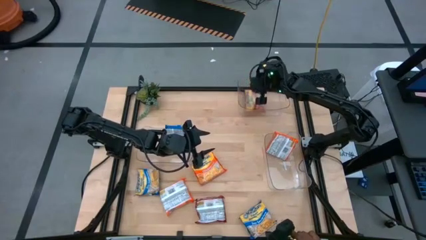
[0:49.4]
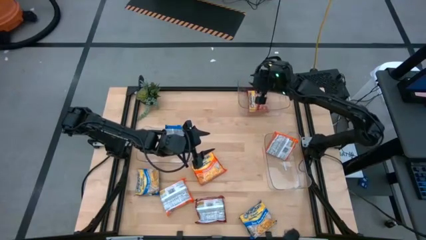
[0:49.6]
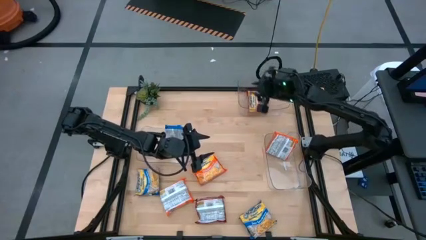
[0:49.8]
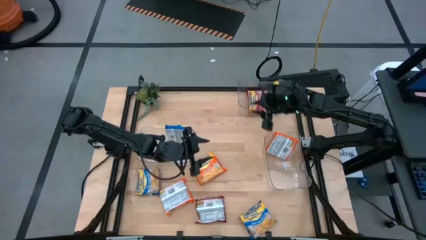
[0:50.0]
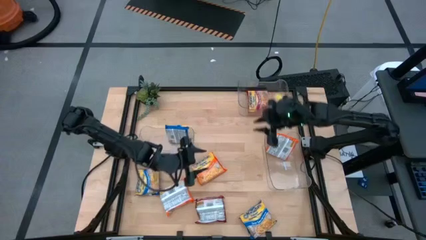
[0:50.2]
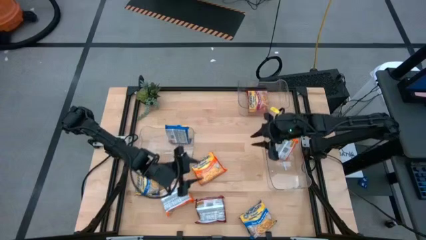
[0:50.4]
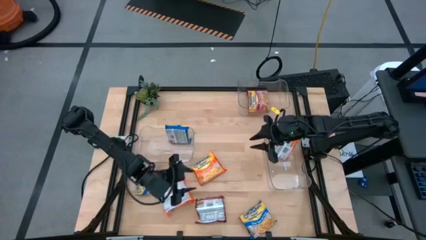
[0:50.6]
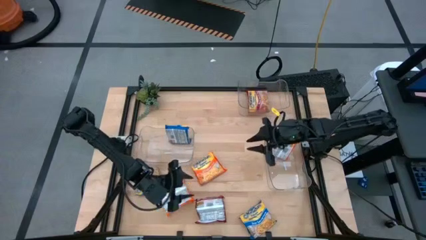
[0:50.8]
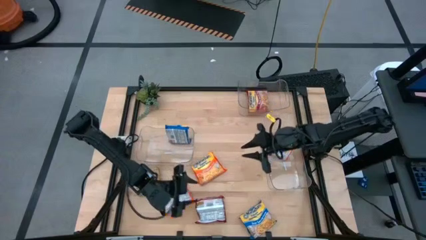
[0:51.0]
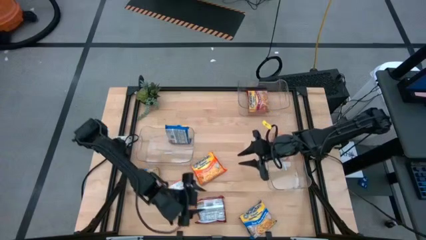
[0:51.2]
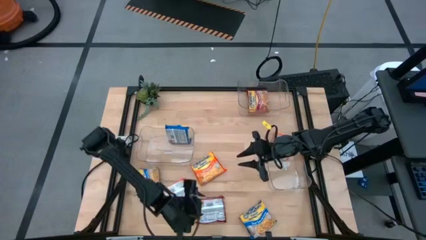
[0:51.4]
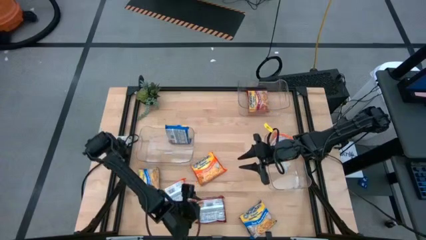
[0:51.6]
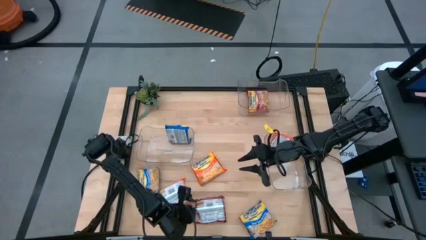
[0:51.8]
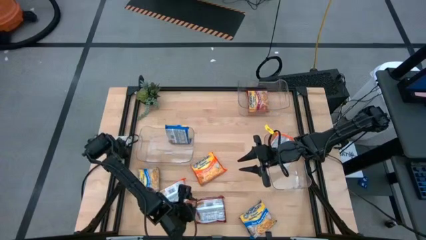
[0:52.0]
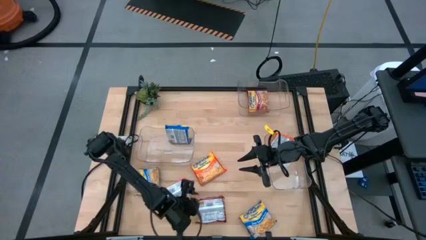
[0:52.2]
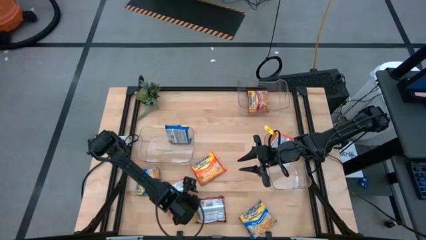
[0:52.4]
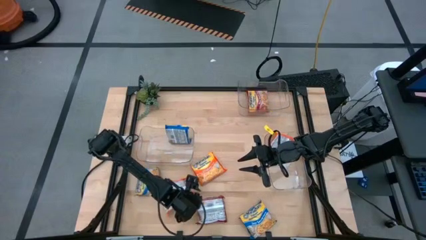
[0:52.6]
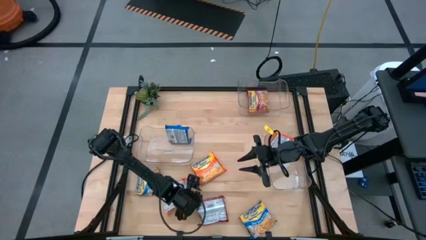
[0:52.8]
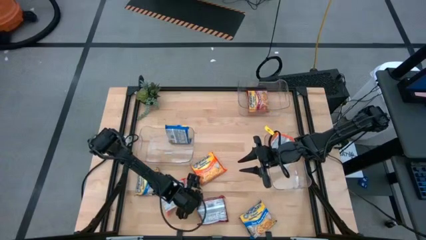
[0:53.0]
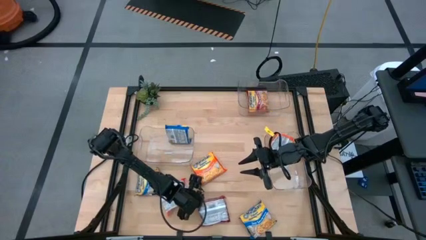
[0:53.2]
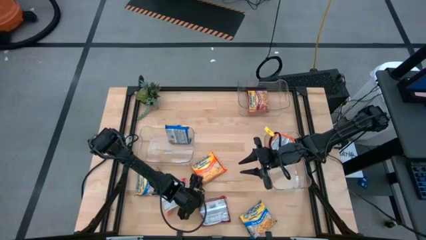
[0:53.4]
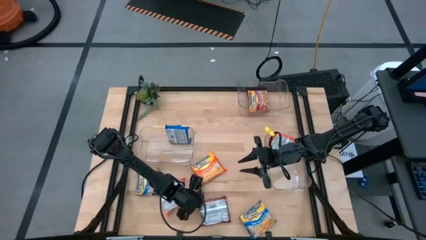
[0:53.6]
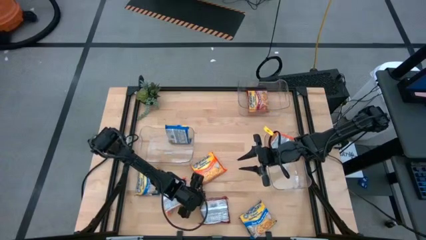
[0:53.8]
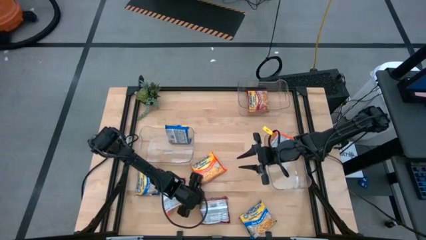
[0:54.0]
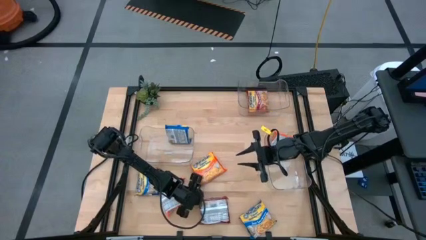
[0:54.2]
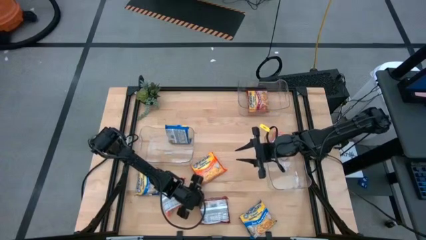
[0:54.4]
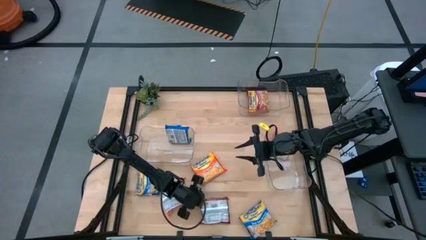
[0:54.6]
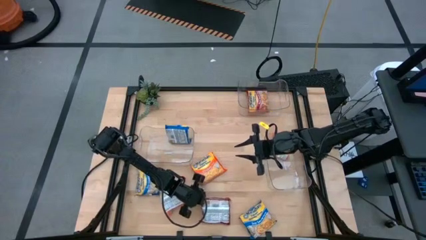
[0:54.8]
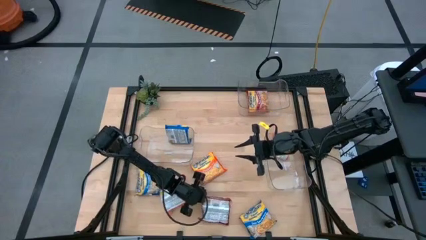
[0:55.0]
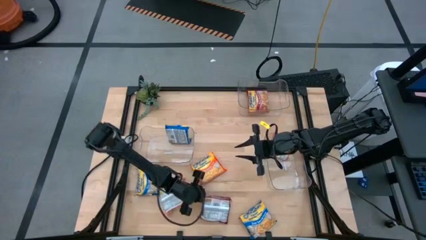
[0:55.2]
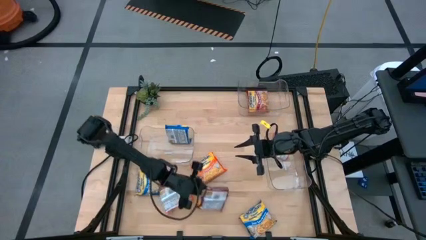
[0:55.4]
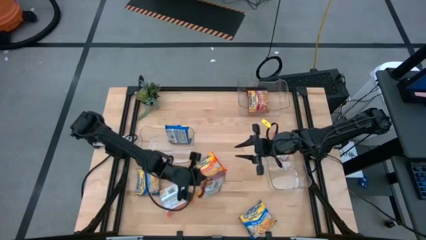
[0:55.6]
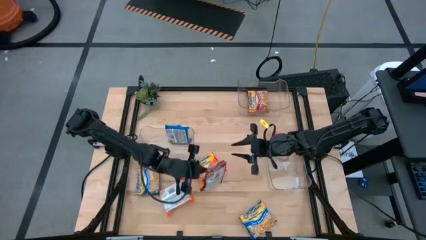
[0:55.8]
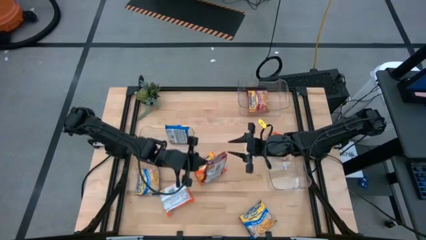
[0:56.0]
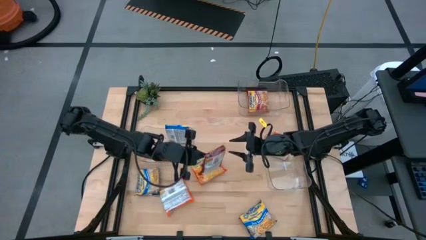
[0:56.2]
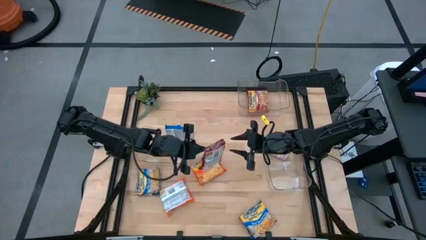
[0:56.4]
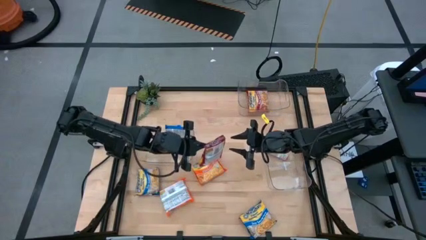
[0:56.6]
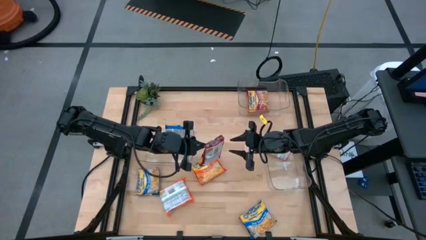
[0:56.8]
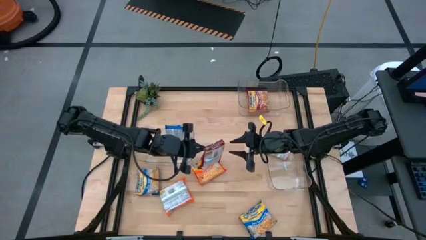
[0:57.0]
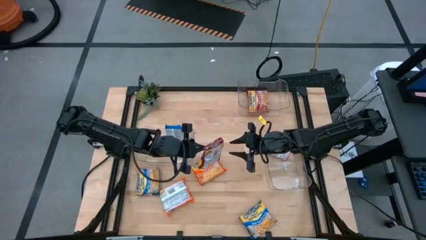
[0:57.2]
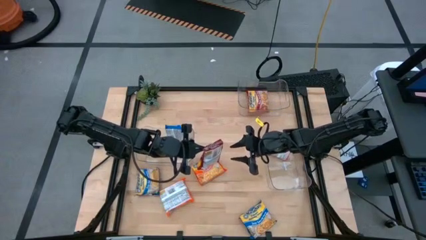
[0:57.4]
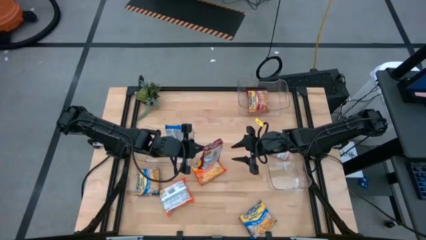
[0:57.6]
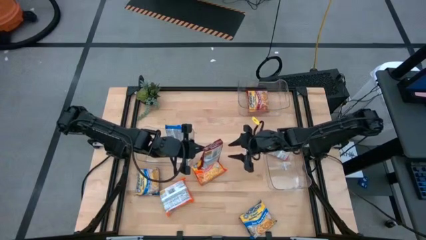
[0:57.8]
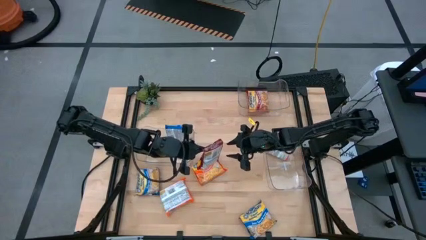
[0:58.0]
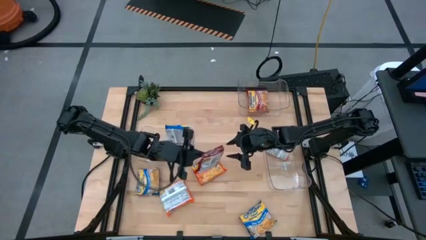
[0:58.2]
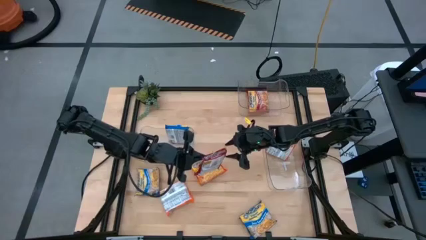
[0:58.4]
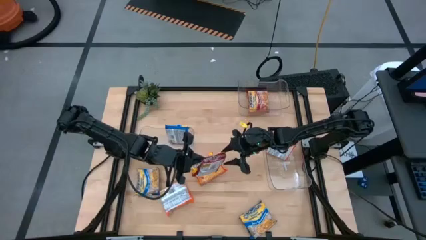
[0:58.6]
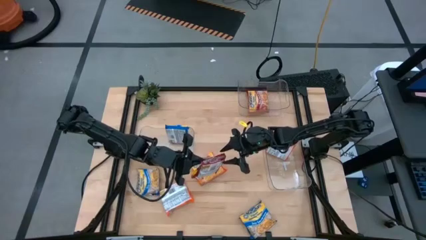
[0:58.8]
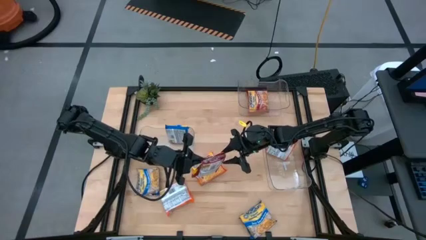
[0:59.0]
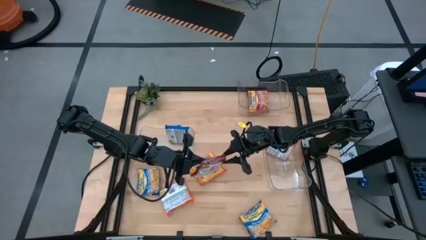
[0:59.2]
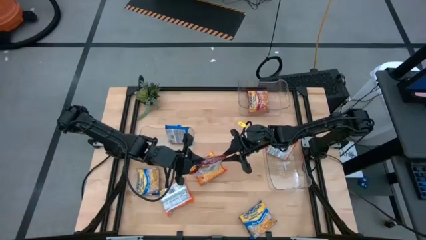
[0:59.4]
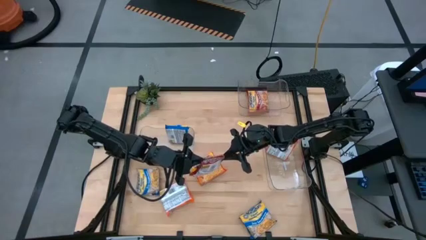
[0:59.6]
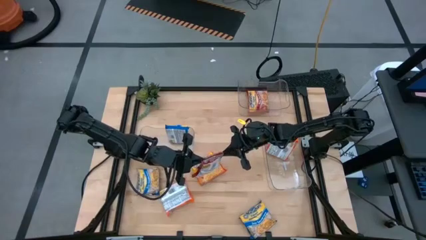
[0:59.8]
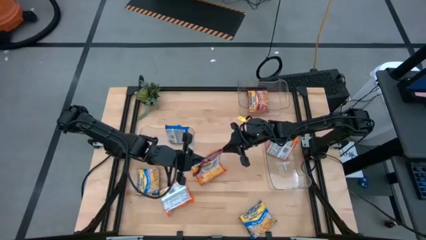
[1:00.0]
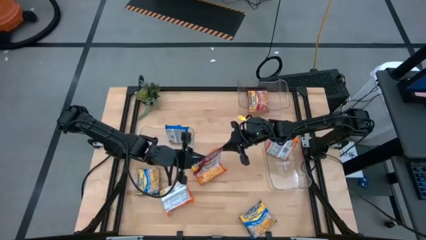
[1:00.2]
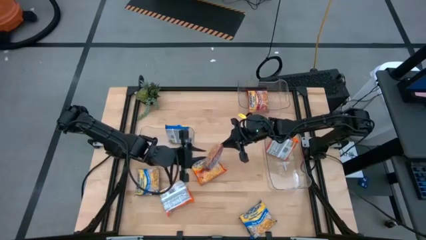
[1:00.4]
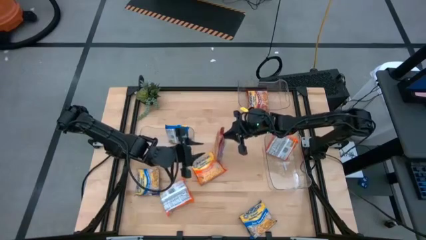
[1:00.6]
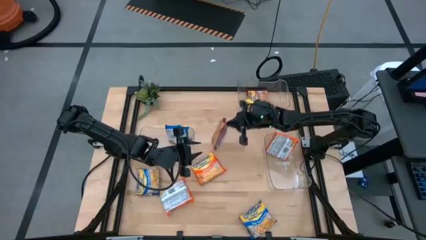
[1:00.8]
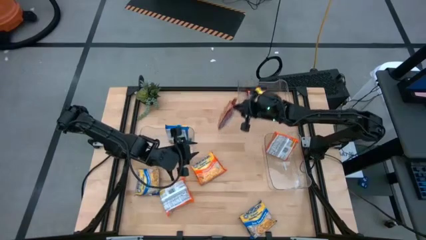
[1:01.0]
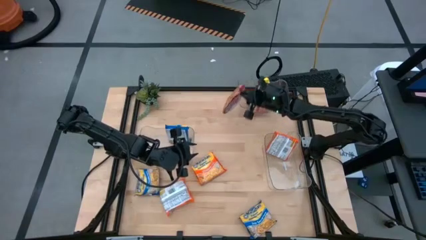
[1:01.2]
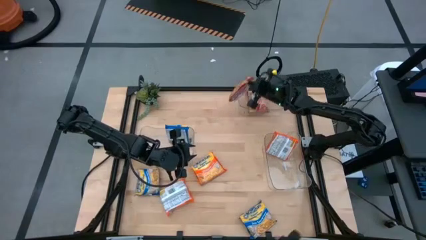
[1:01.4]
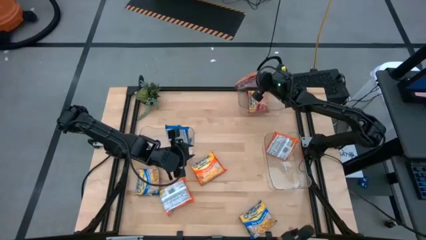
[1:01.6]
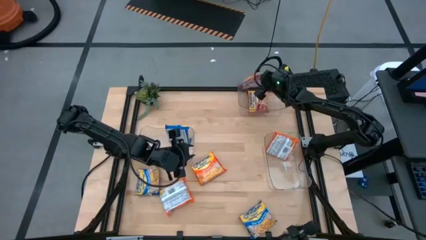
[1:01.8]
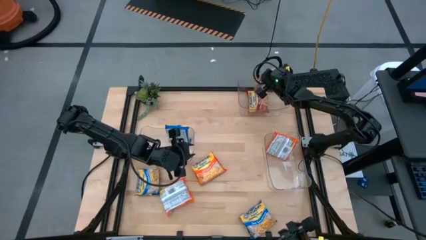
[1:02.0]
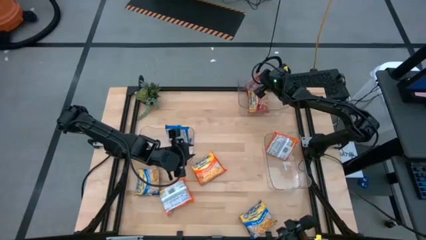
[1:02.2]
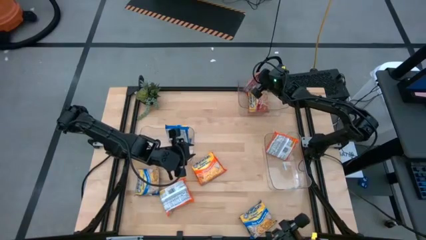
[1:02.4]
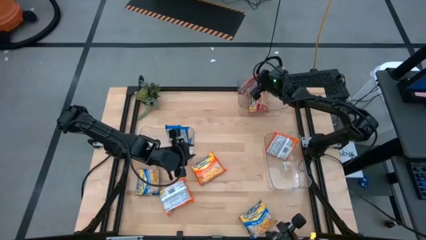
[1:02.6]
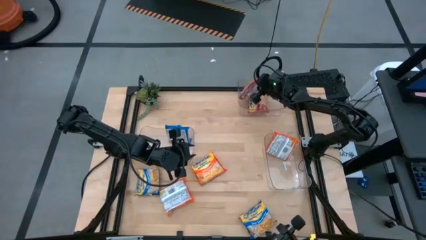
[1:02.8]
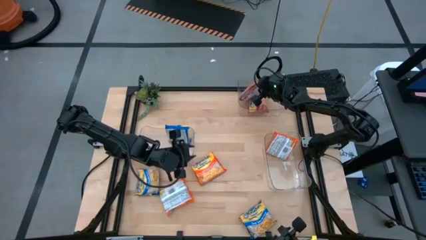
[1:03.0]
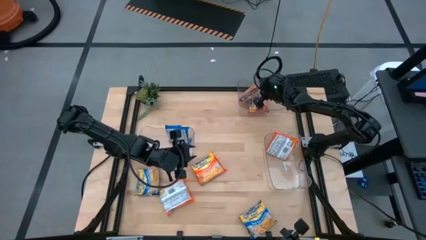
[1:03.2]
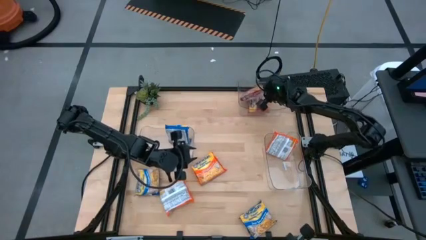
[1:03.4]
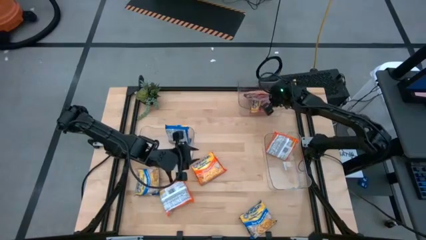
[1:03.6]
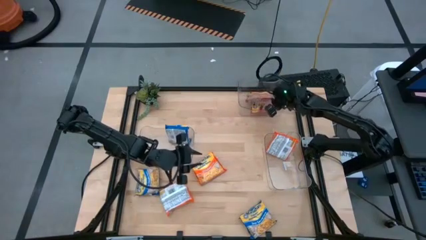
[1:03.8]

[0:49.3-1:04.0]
Task: Sort Maruchan noodles
Put the red noodle pack into the top transparent bin

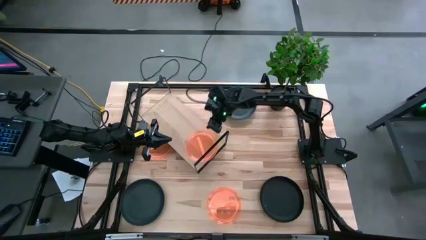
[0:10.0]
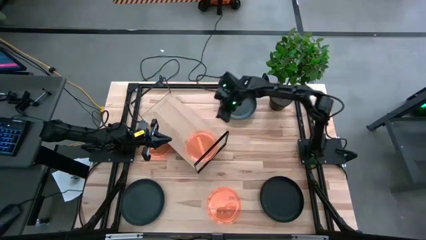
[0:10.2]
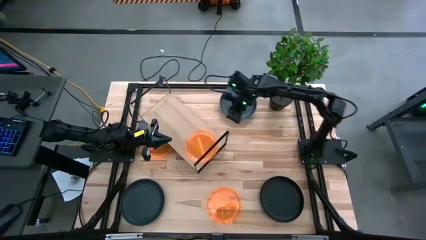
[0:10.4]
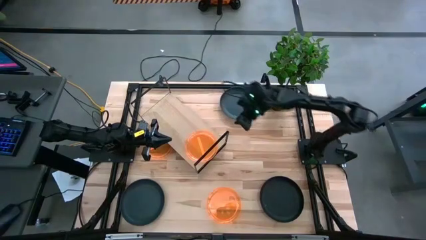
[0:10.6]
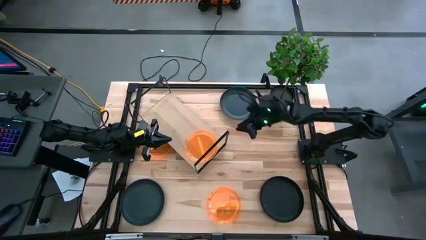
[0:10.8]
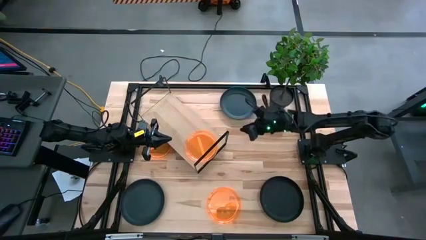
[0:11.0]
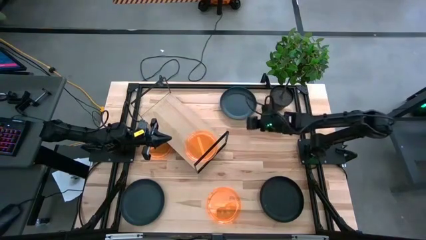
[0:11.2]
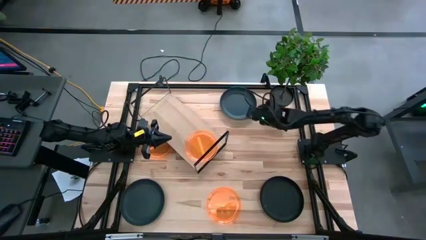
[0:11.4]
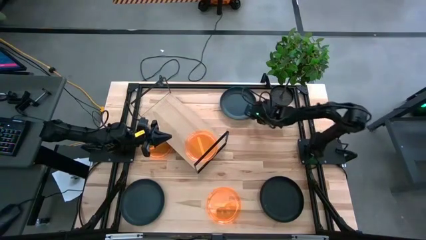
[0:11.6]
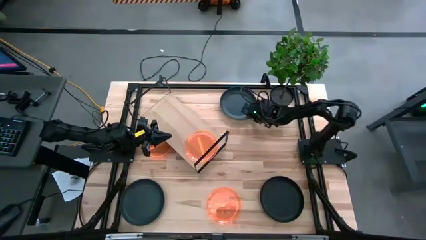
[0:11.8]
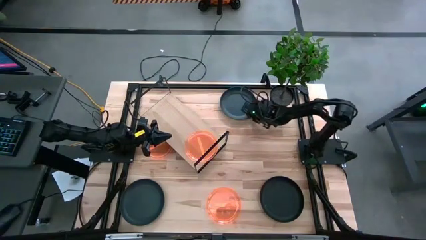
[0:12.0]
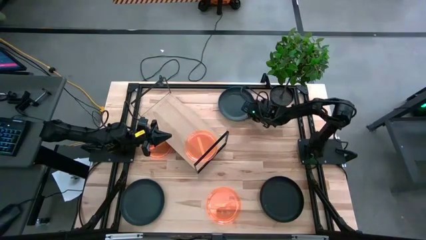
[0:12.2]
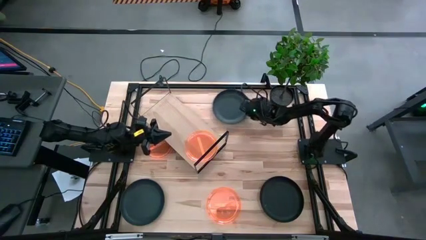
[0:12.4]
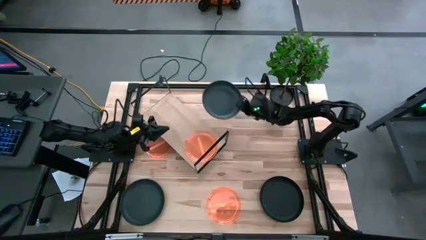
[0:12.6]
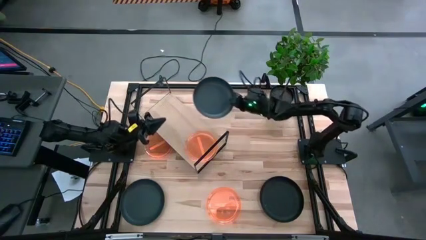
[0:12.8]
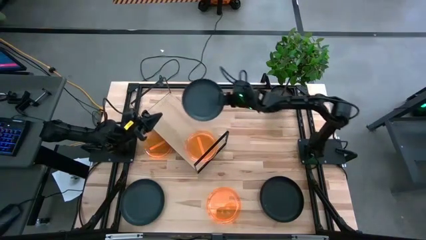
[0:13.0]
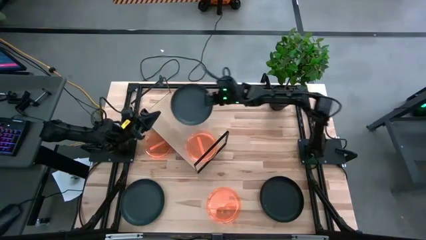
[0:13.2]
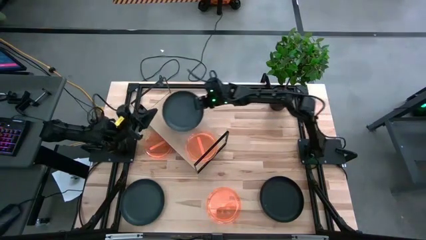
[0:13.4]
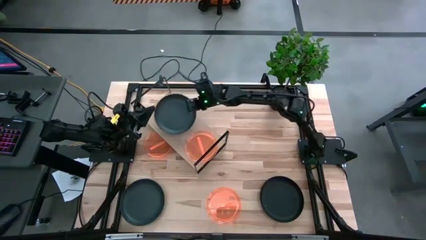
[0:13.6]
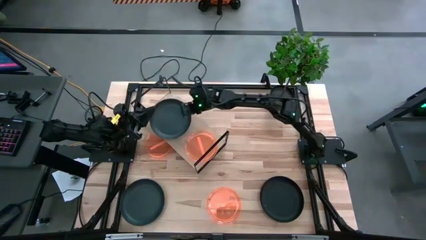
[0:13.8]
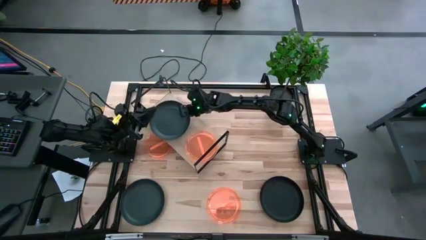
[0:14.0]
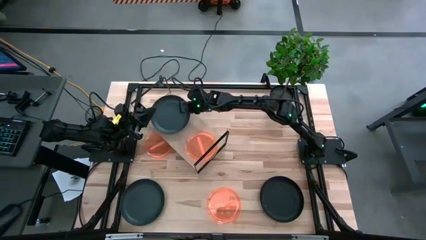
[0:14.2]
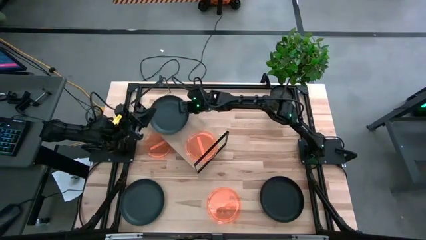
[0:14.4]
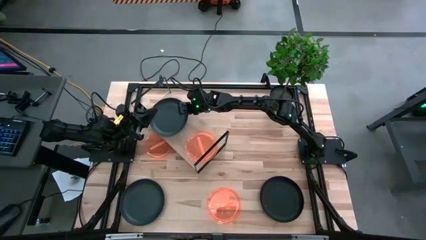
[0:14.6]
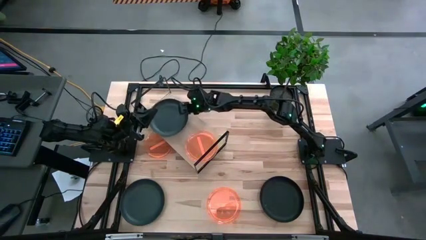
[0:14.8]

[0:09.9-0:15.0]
Task: Place and stack plates onto a shelf
Put the top black plate on the shelf
